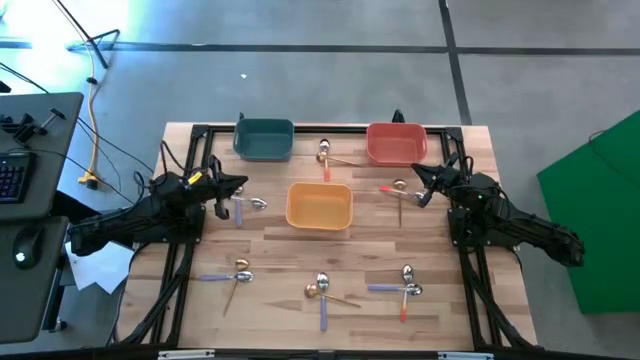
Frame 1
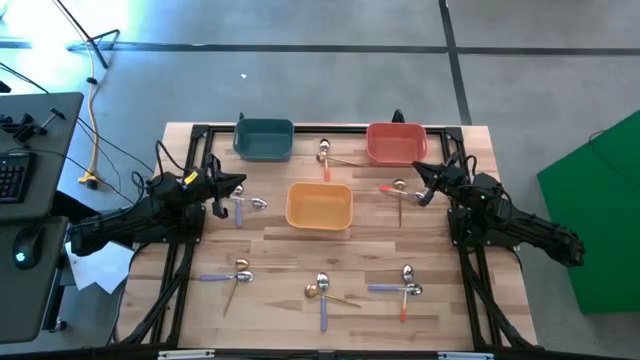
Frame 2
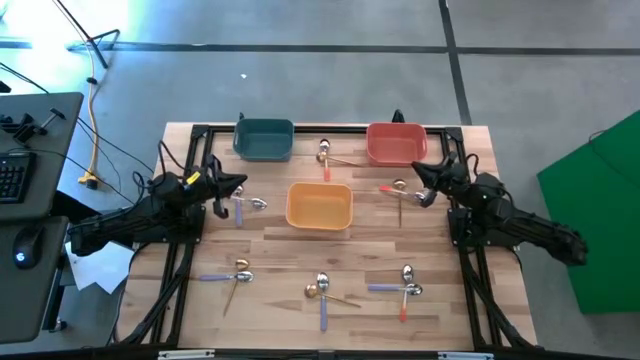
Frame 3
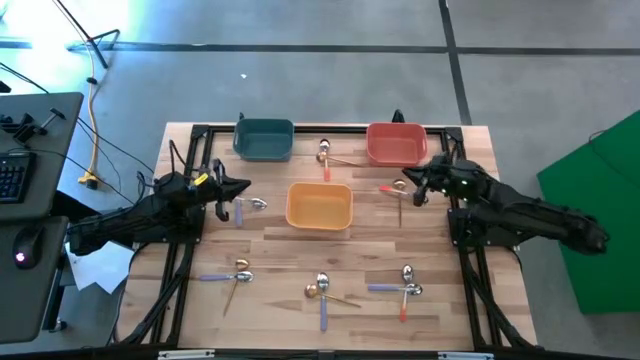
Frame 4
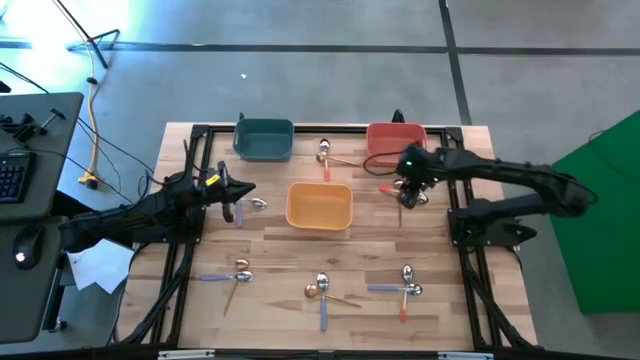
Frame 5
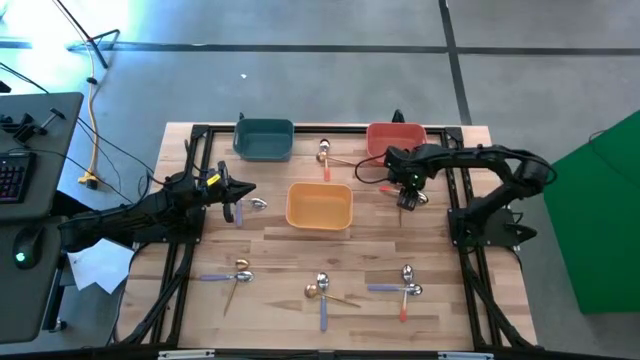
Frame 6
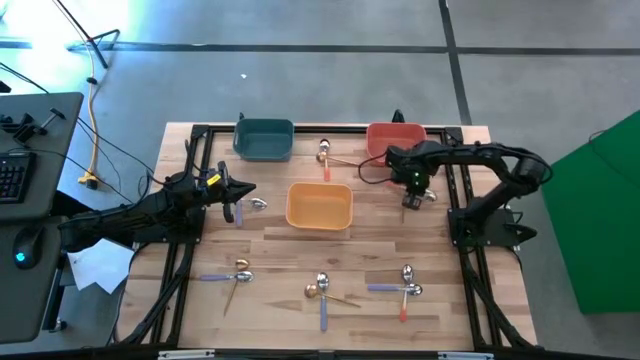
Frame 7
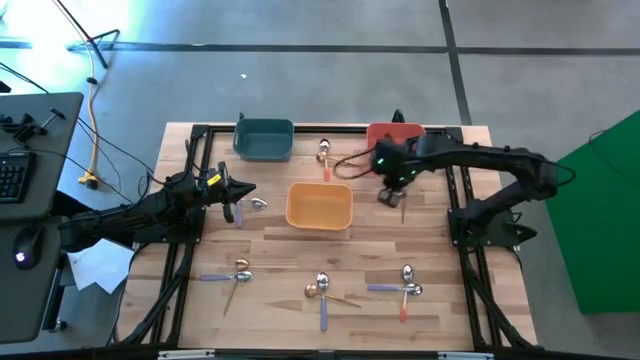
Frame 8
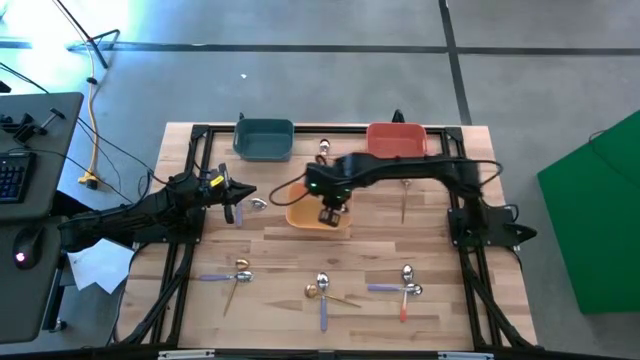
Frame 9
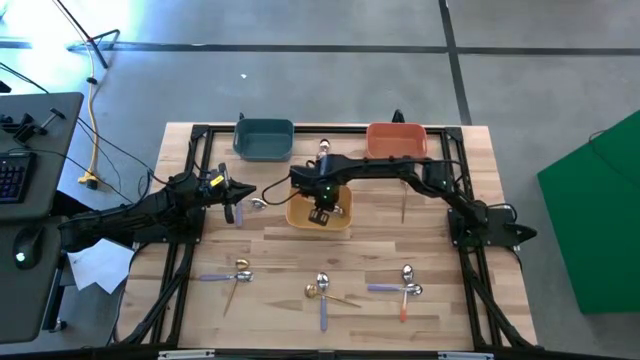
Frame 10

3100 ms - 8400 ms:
Task: Sort silverware by color (type)
Put the orange spoon into the yellow bin

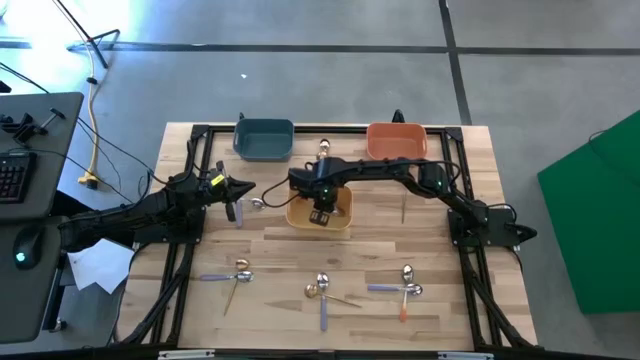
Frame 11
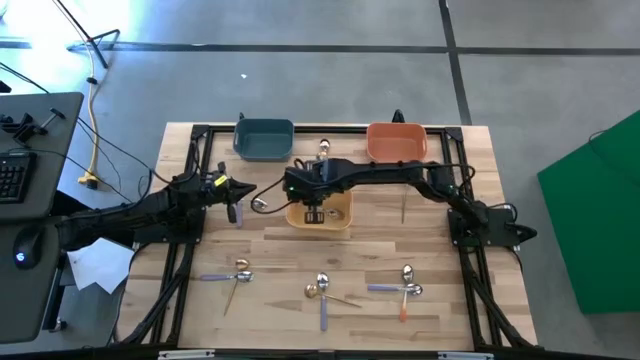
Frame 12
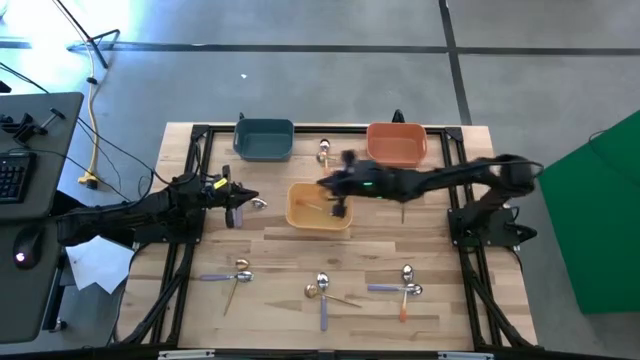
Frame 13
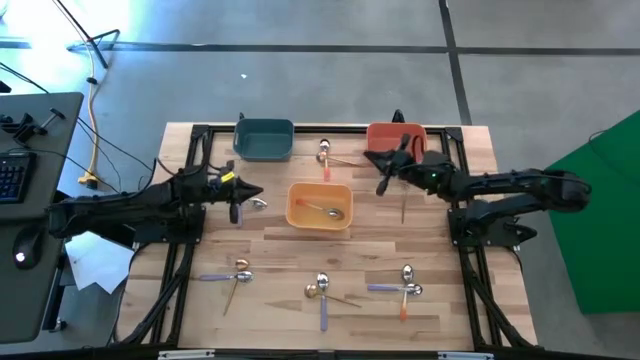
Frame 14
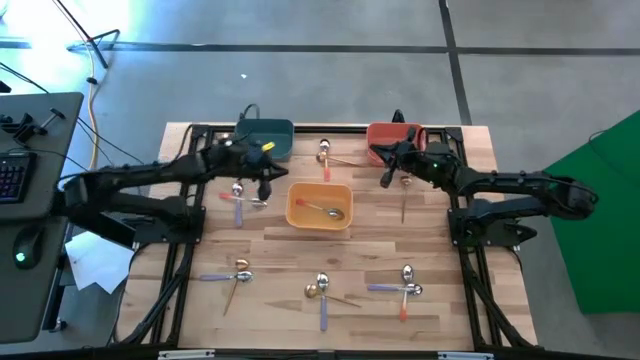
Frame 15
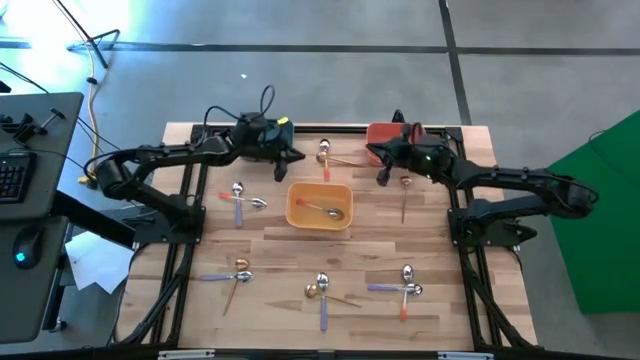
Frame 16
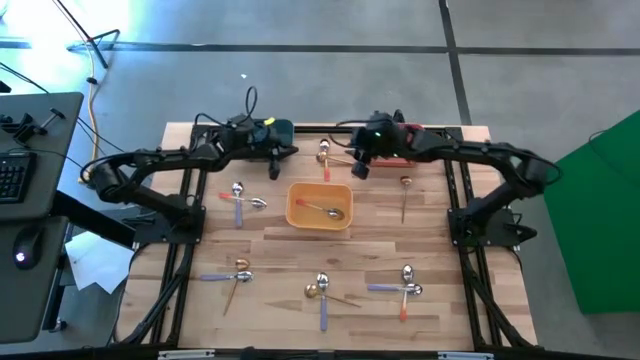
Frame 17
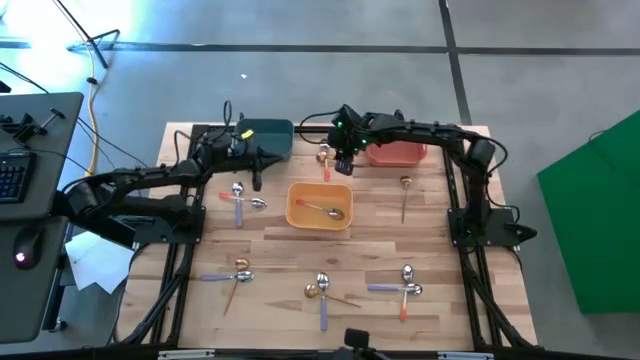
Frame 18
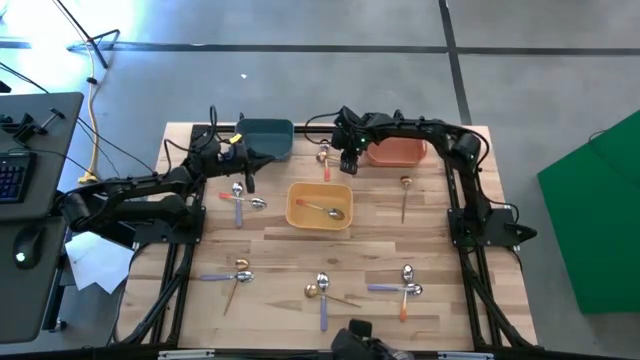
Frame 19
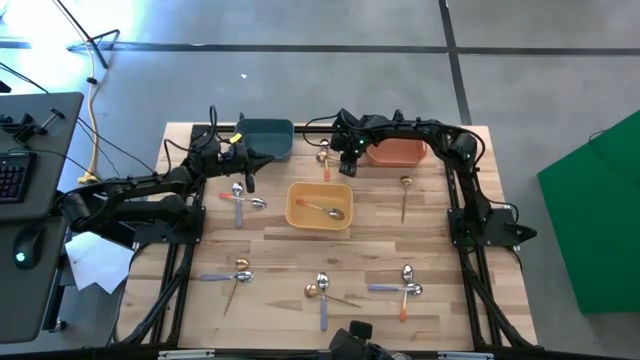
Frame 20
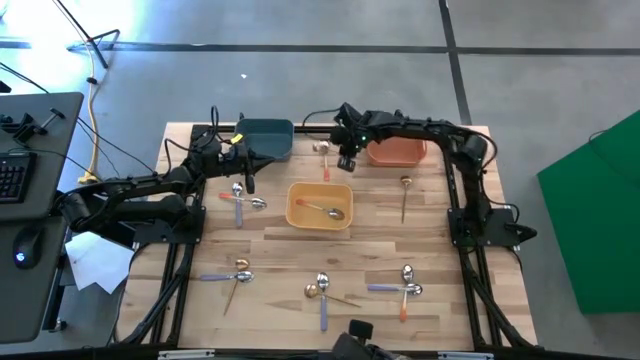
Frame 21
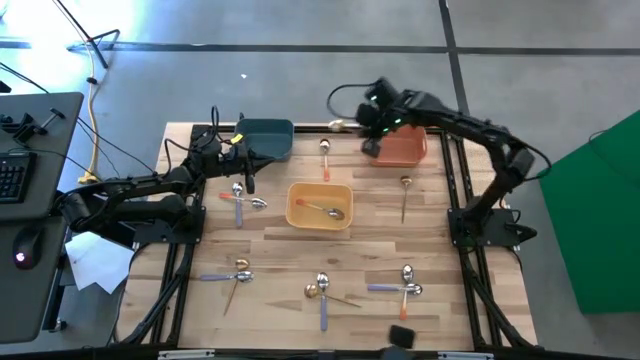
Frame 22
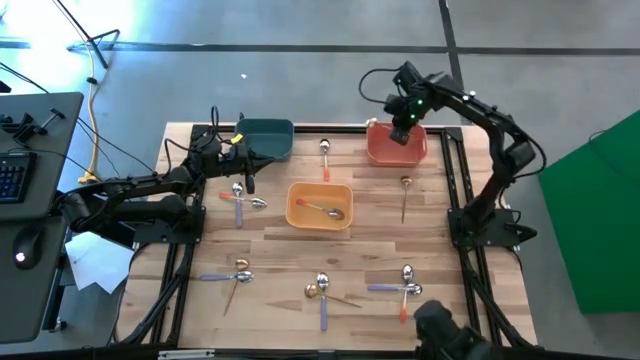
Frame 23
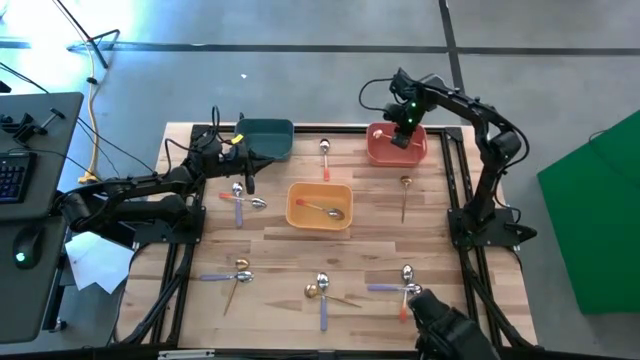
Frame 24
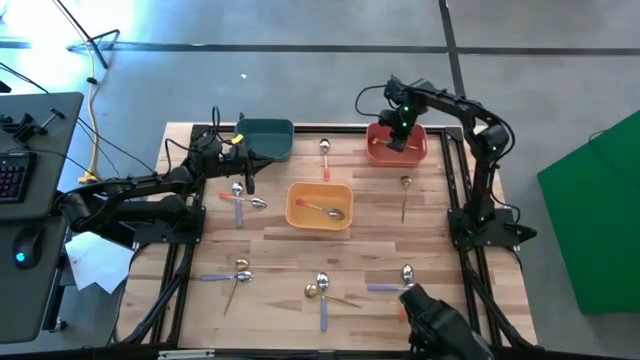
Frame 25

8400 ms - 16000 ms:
Put the gold spoon into the orange bin

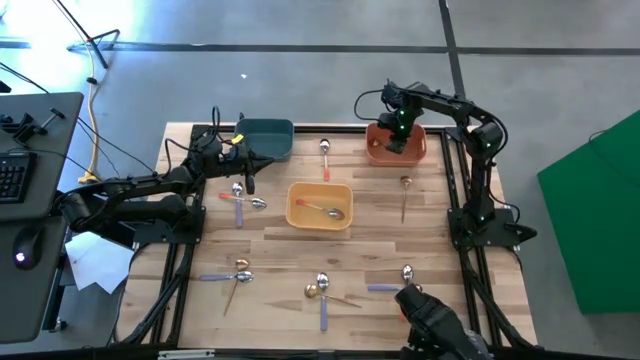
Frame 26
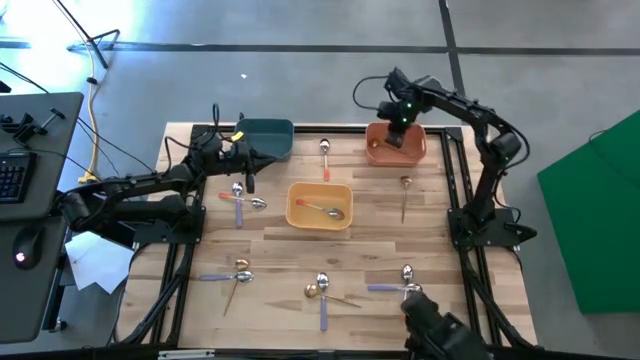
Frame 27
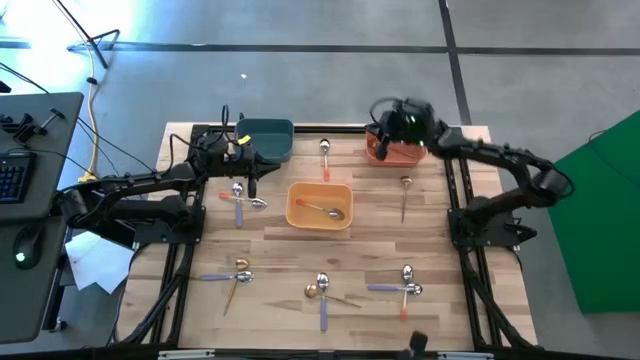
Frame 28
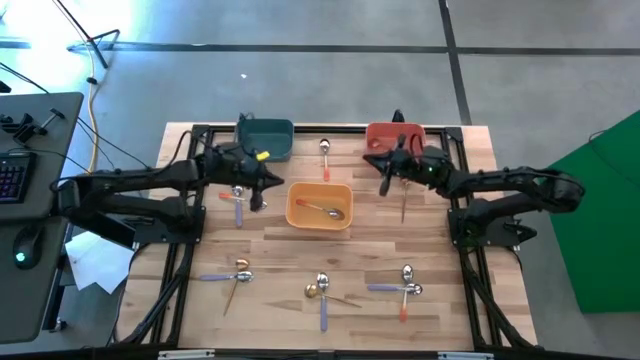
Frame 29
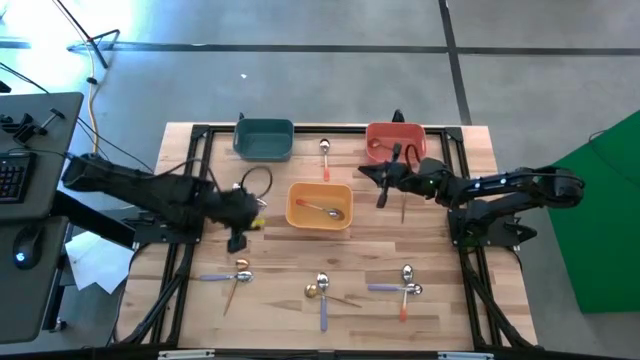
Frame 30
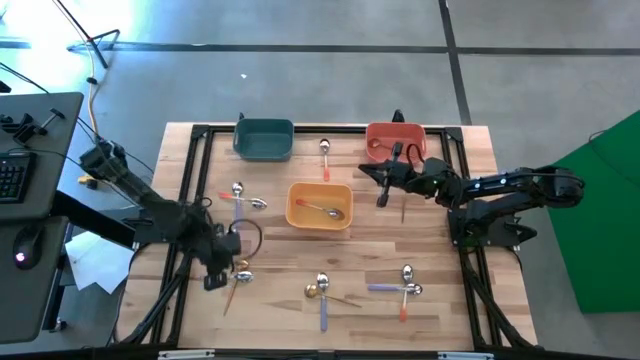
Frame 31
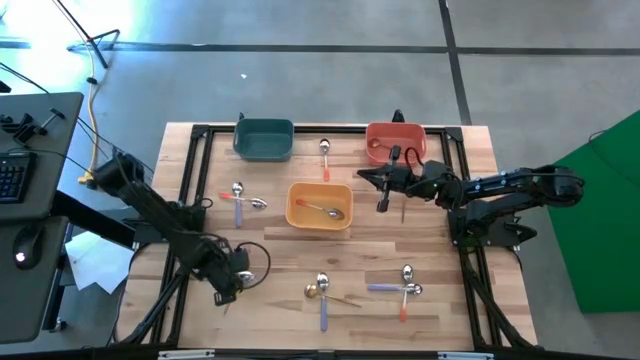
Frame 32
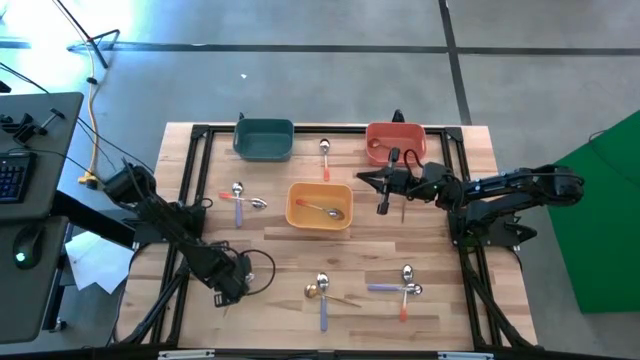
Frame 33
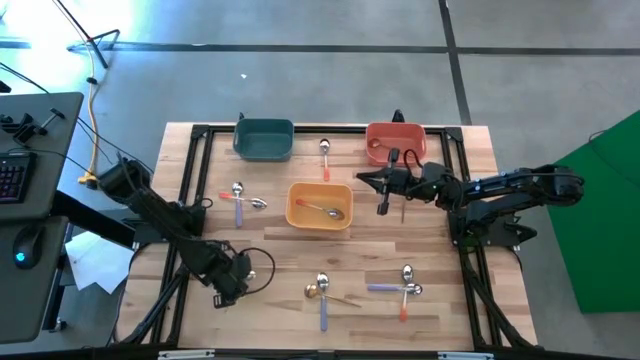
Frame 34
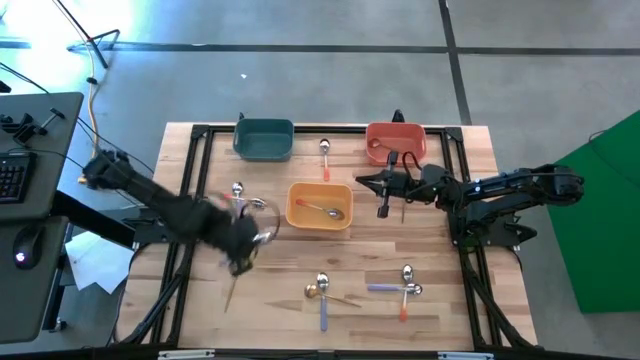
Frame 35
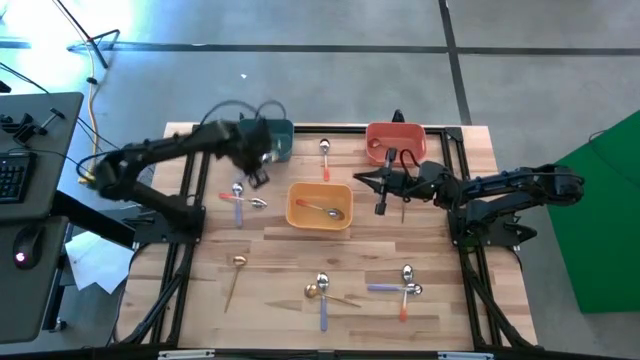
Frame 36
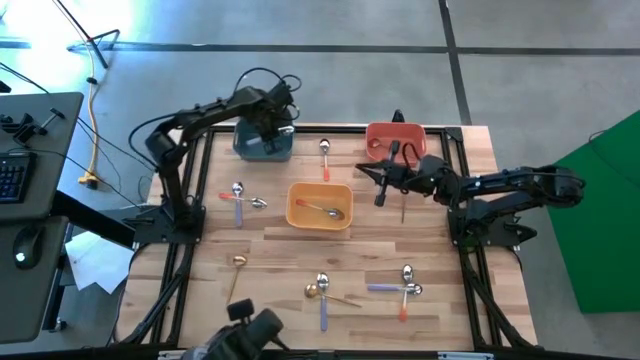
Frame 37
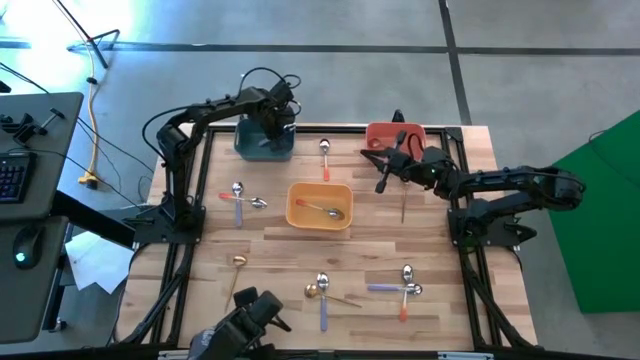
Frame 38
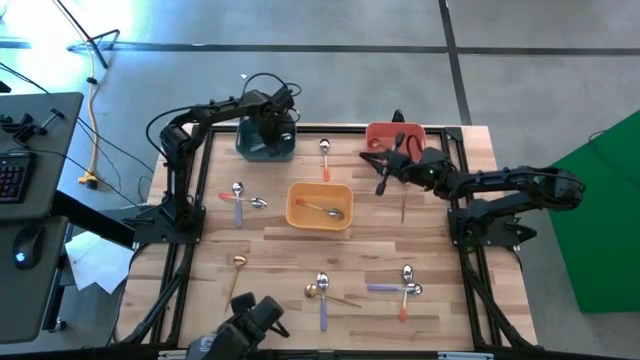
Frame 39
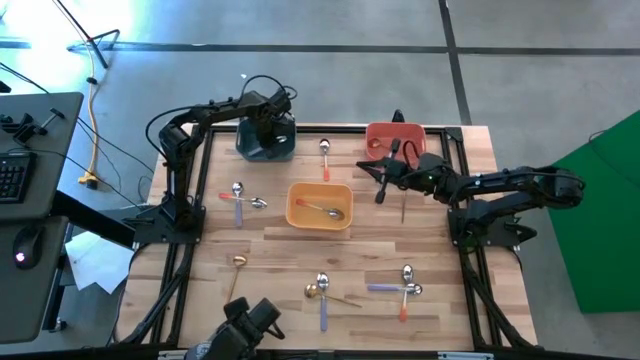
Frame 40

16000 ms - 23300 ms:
Put the purple spoon into the blue bin

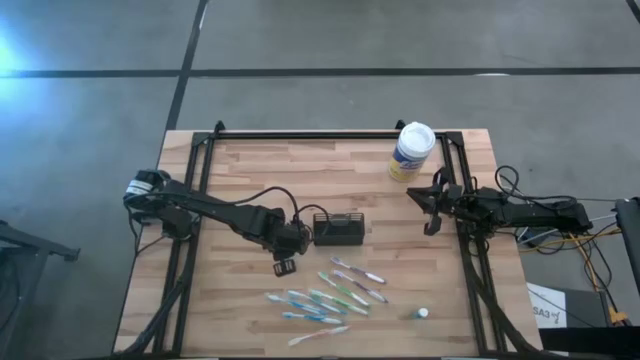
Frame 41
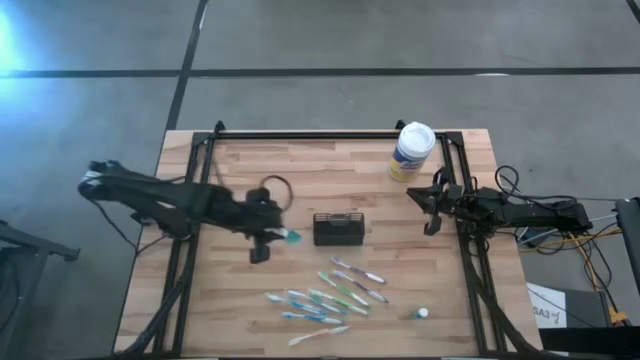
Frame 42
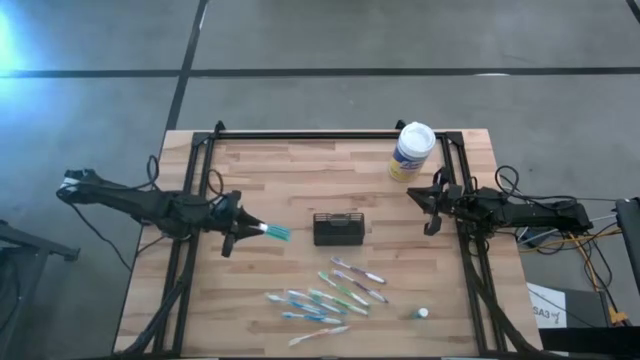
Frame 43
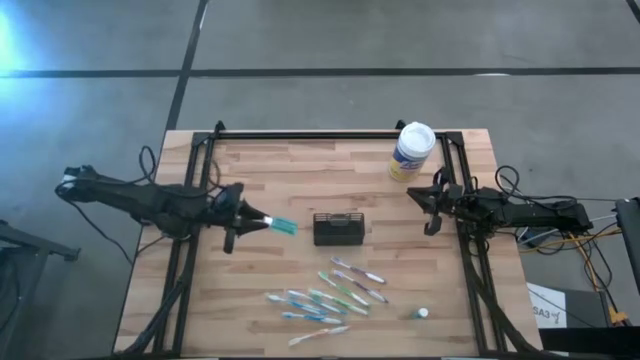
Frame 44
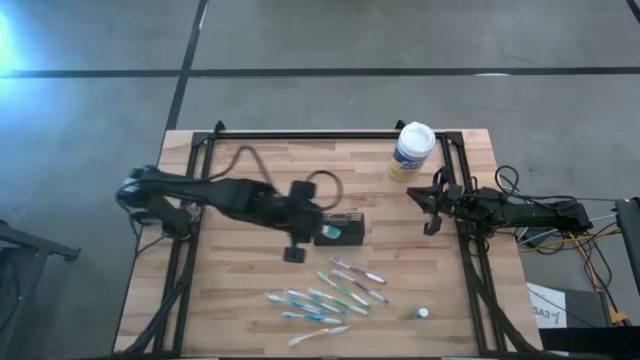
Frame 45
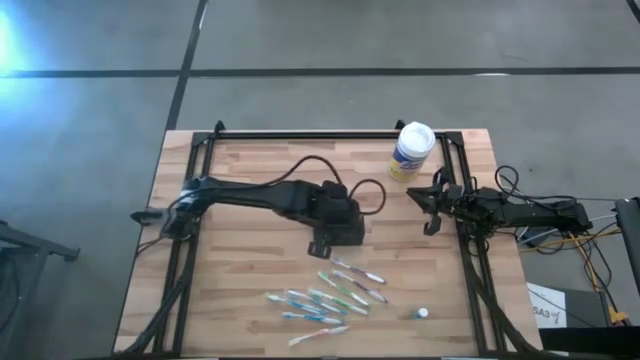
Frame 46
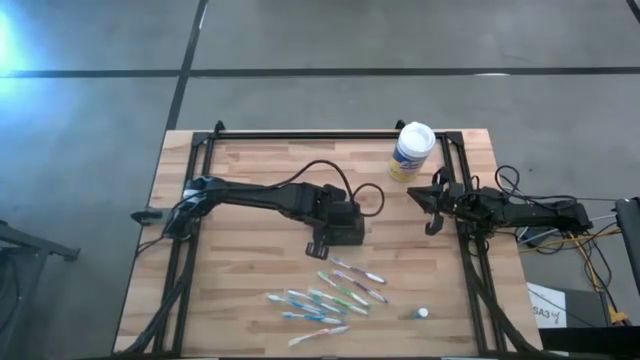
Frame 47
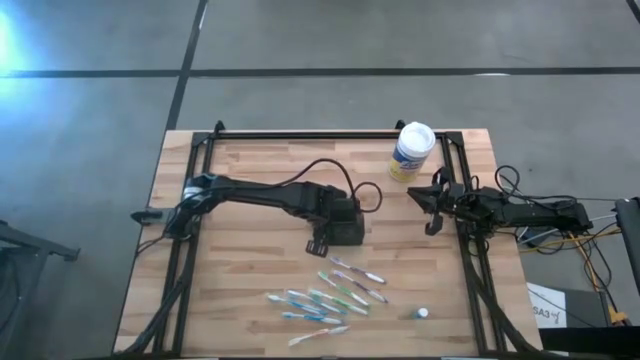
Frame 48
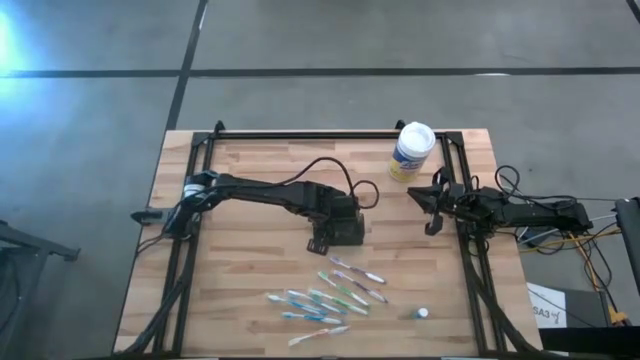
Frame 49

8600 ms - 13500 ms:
Task: Pick & Place toothbrushing station
Put the top blue mouthwash into the mesh organizer
